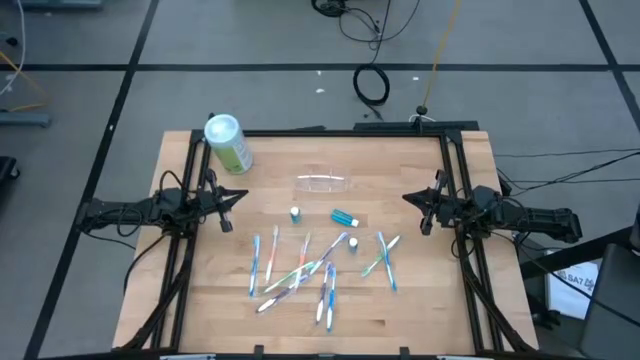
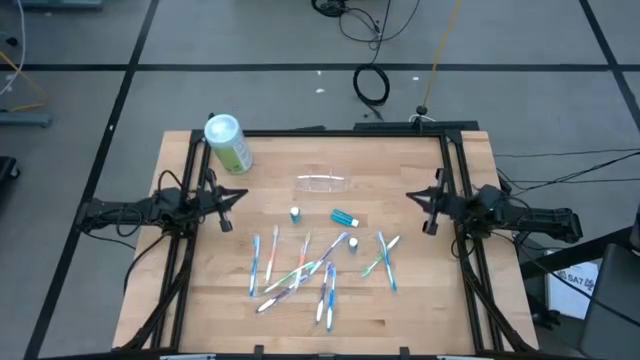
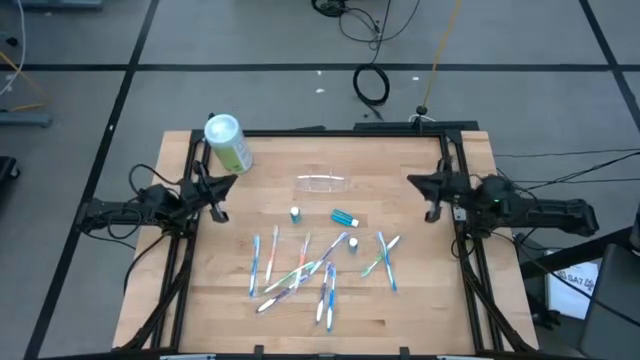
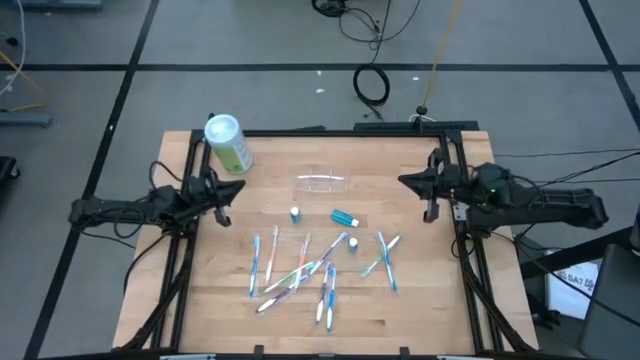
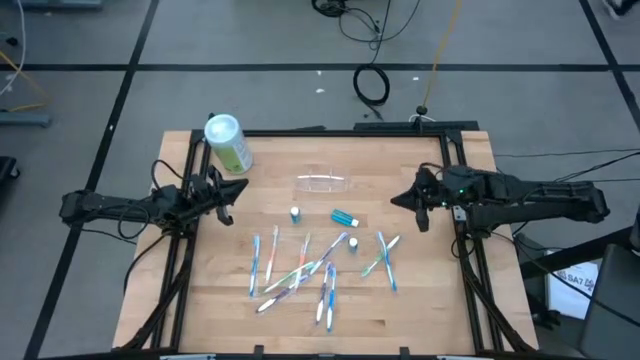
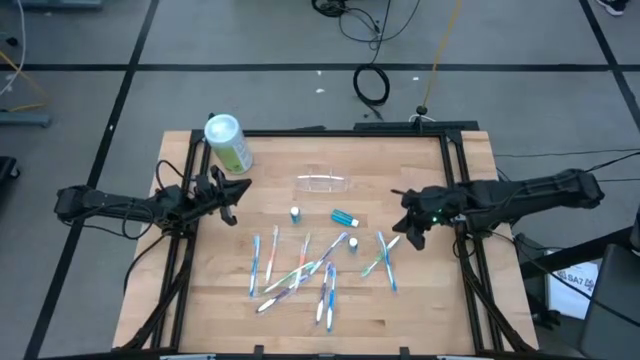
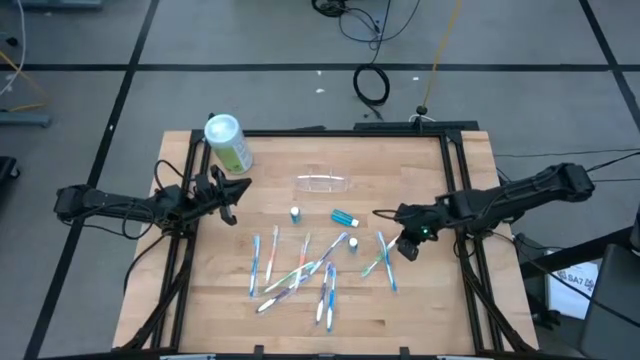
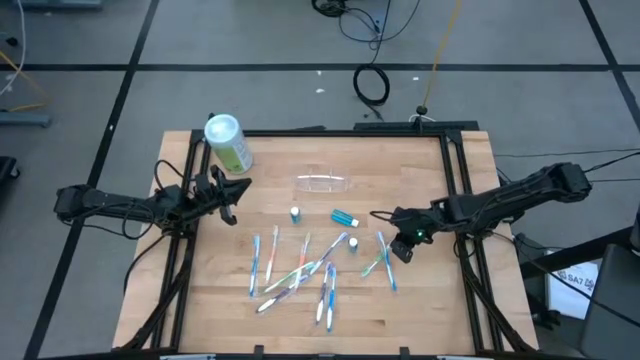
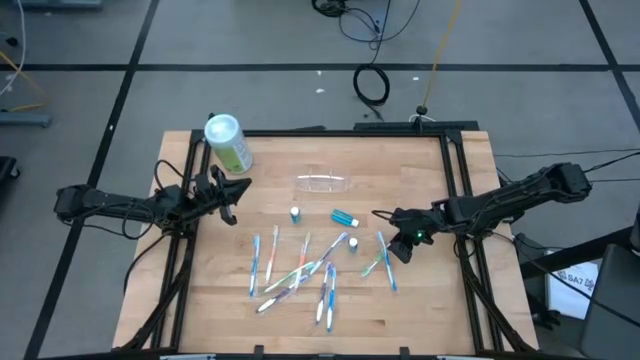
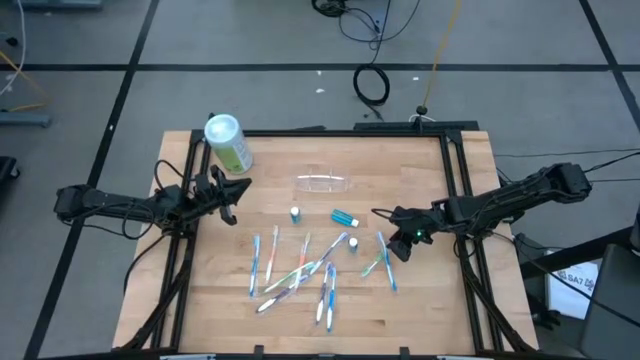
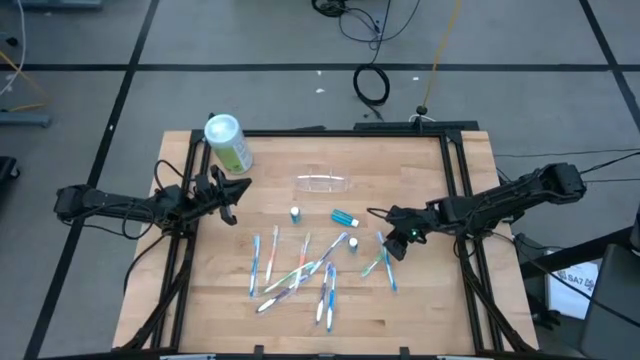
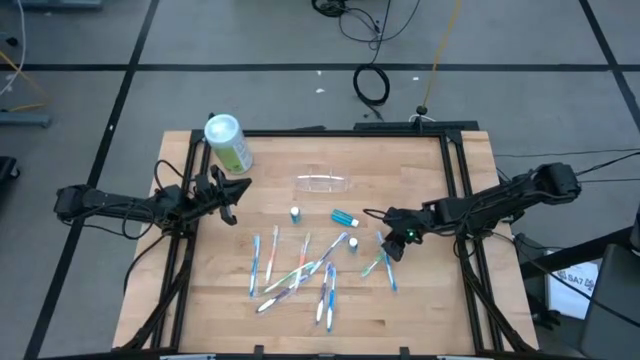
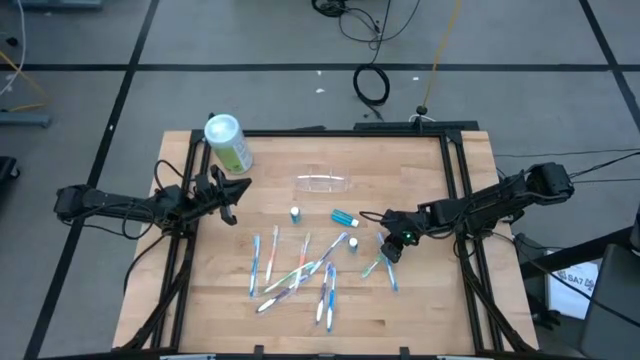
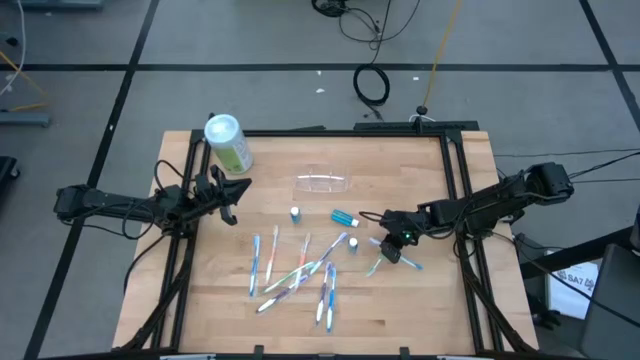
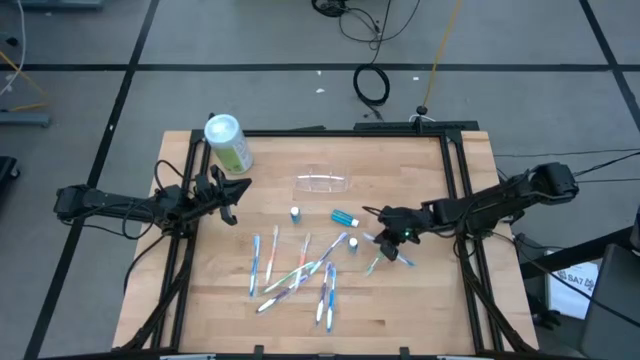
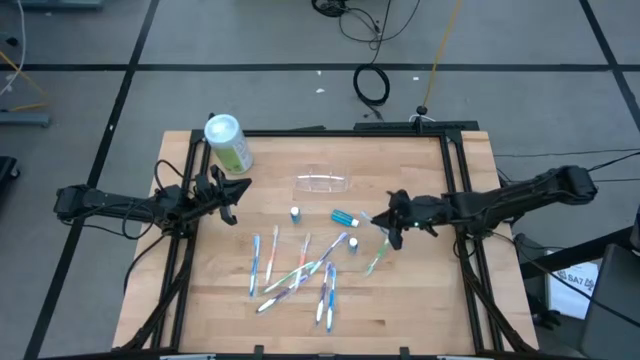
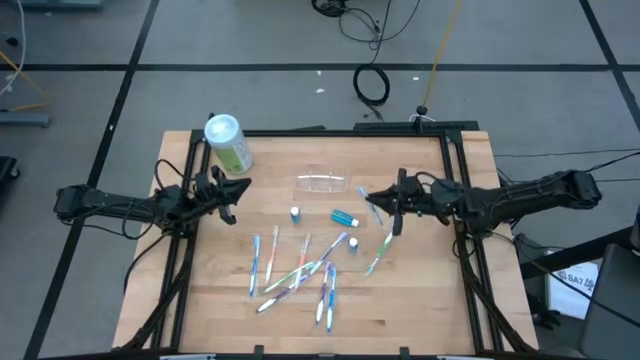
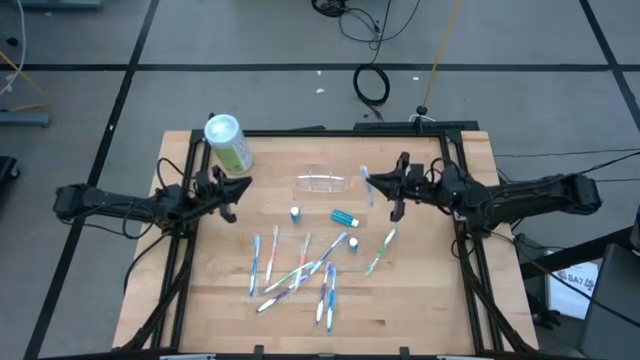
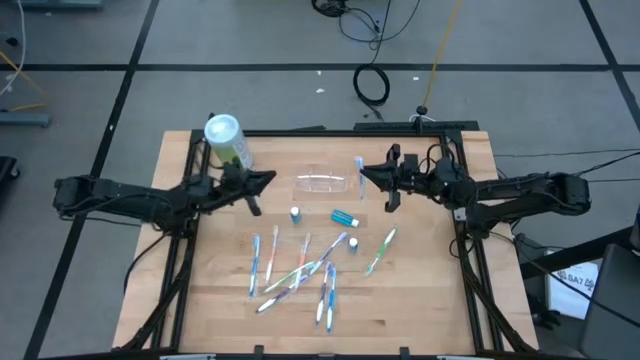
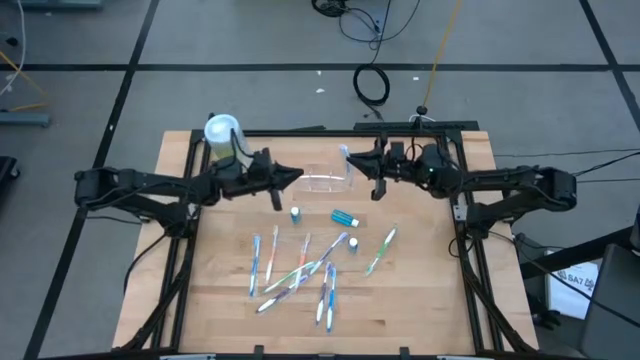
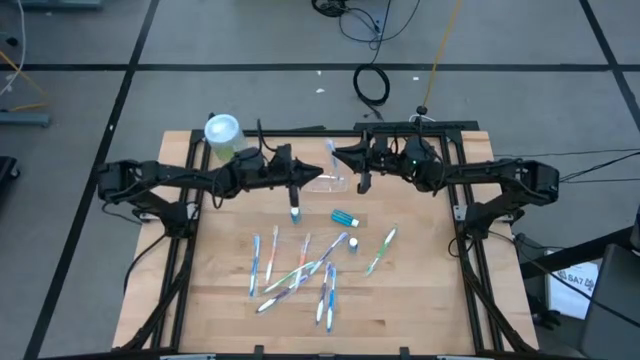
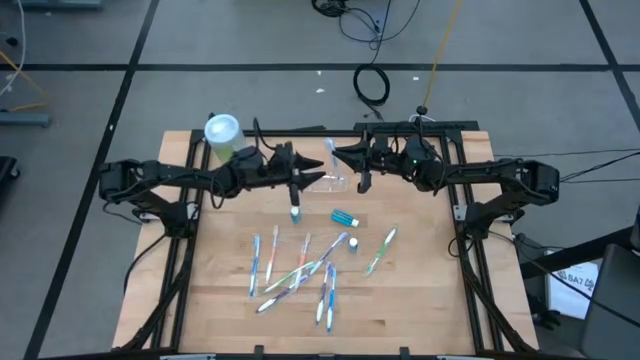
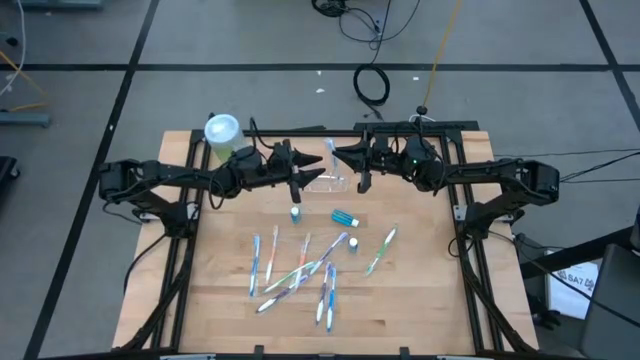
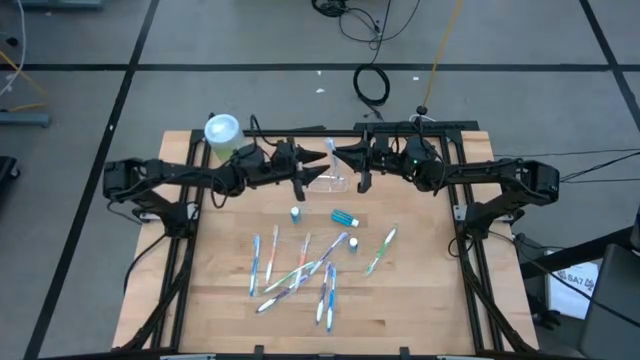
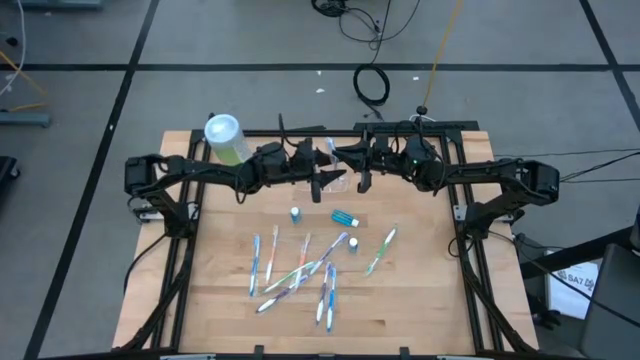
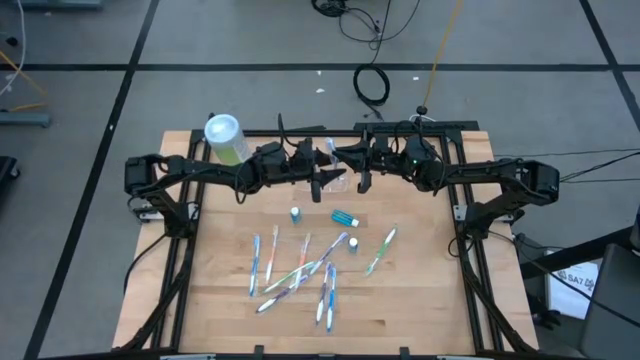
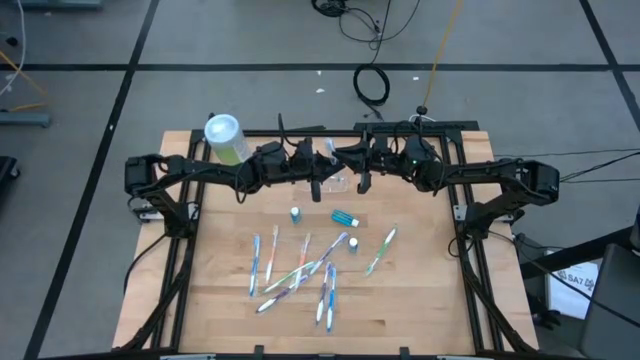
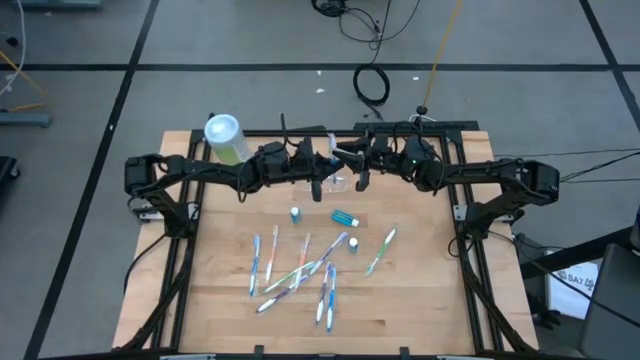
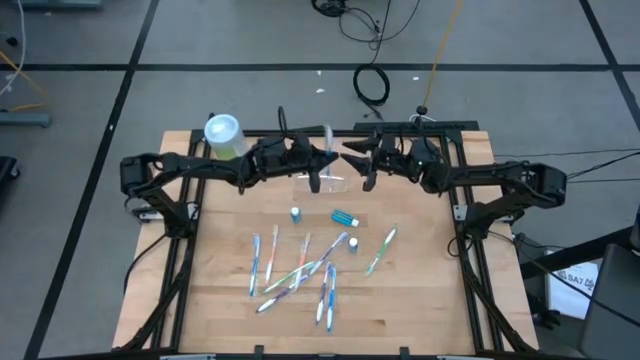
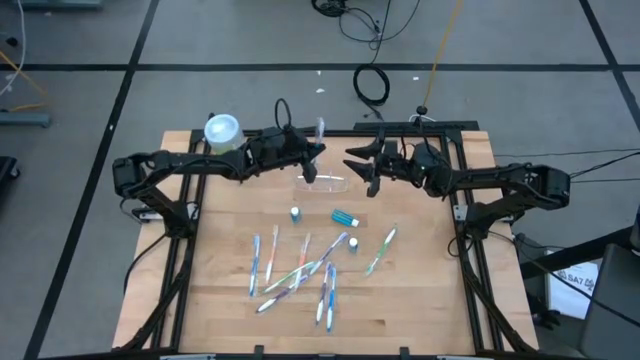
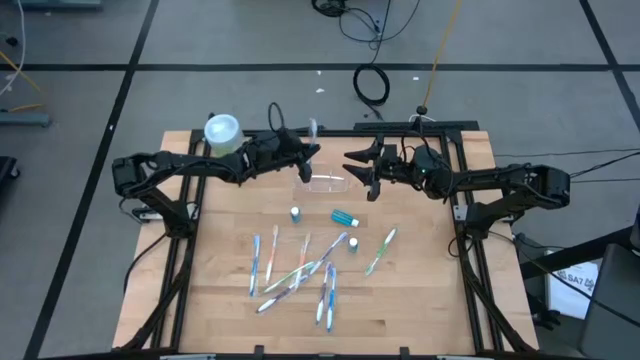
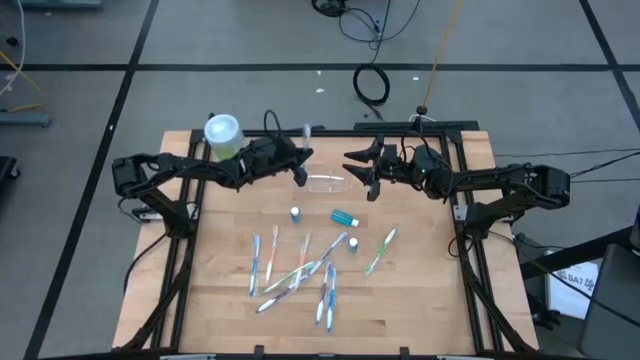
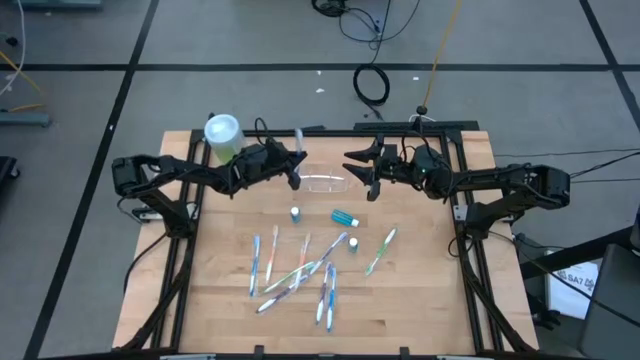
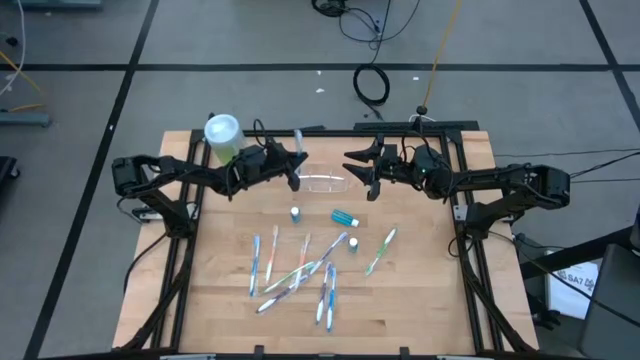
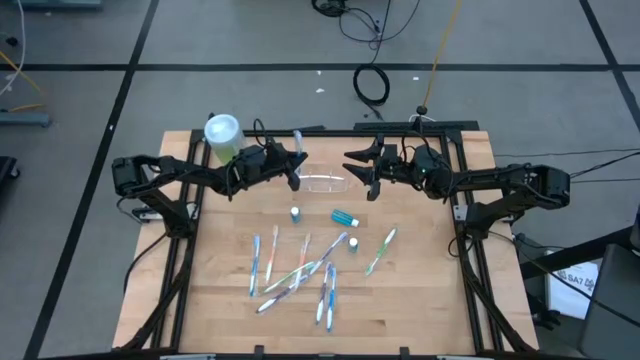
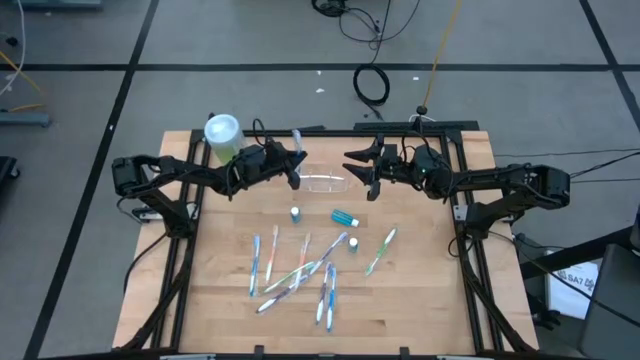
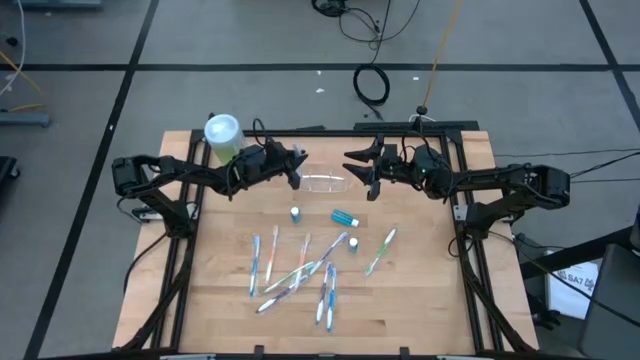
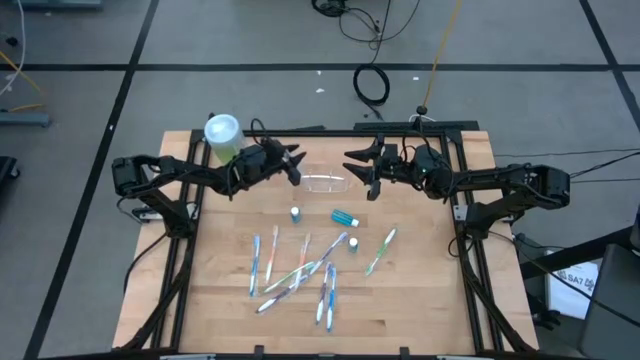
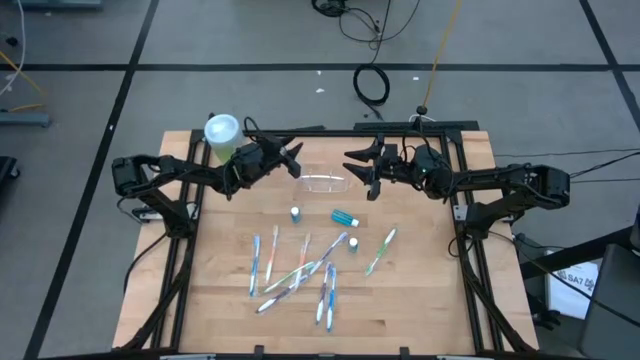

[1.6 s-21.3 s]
Task: Pick & Place toothbrushing station
Put the right blue toothbrush into the transparent organizer
